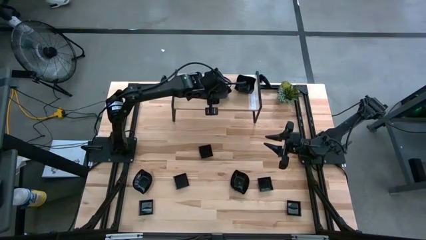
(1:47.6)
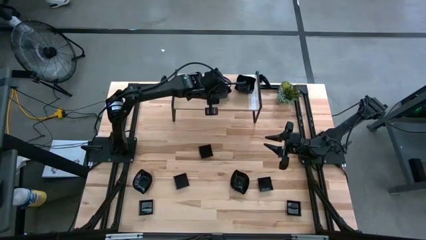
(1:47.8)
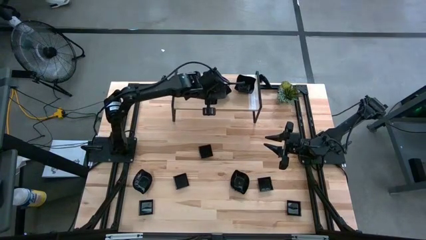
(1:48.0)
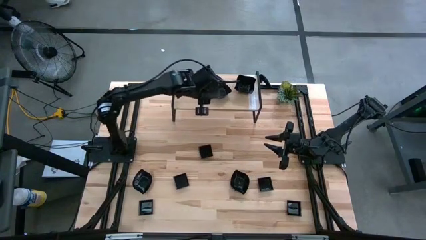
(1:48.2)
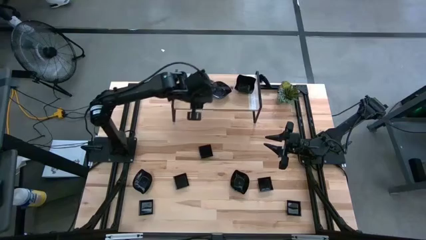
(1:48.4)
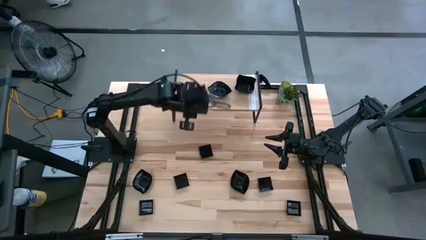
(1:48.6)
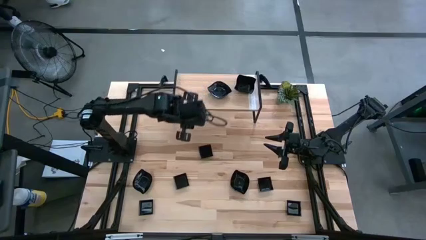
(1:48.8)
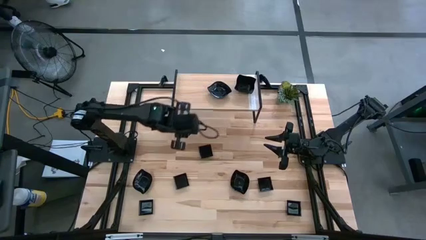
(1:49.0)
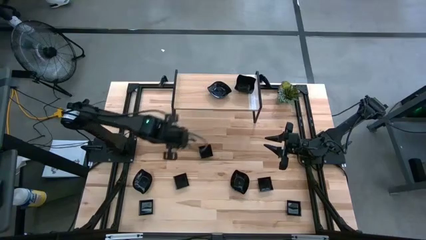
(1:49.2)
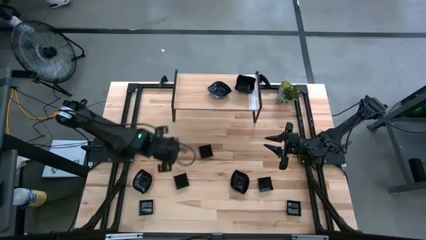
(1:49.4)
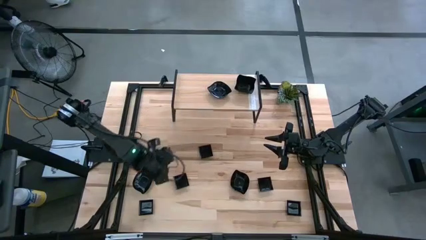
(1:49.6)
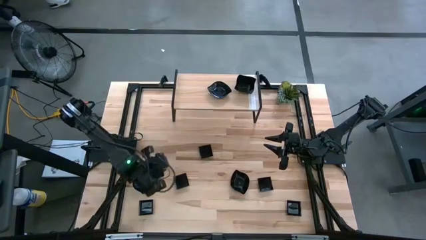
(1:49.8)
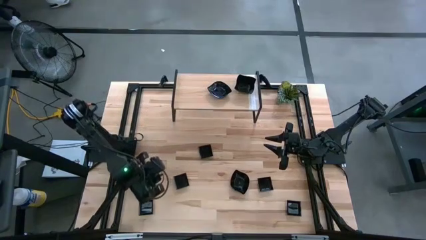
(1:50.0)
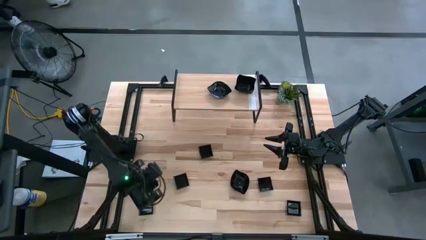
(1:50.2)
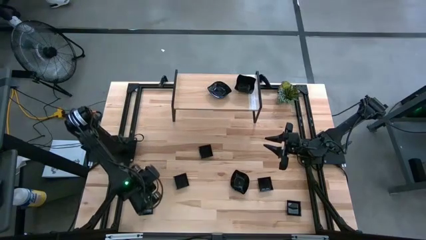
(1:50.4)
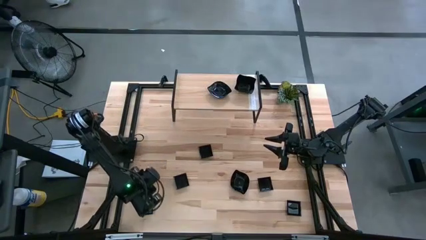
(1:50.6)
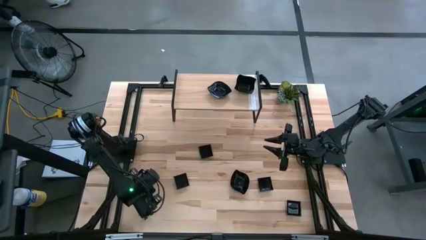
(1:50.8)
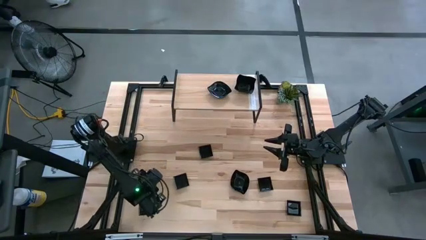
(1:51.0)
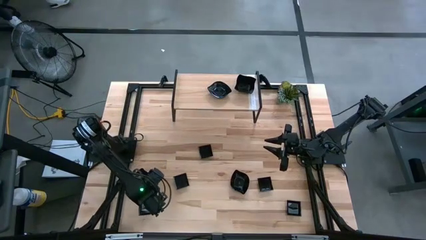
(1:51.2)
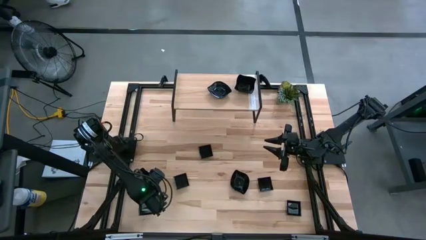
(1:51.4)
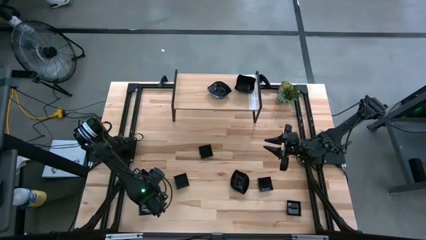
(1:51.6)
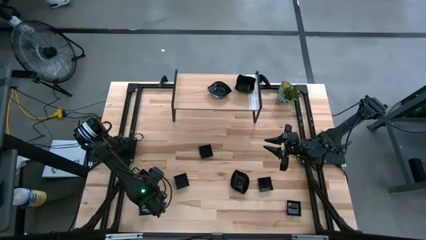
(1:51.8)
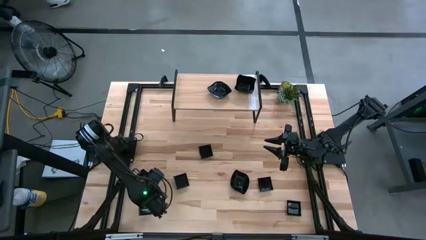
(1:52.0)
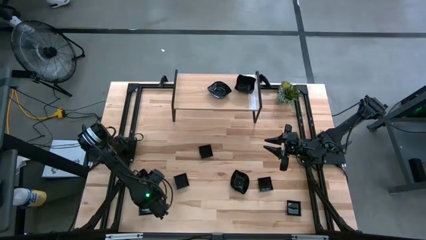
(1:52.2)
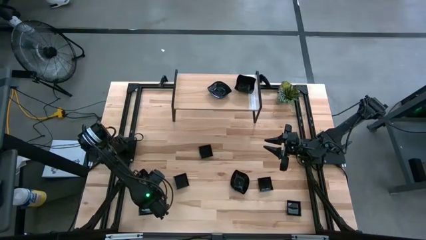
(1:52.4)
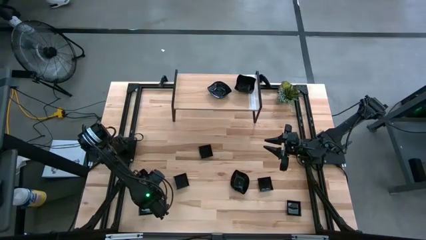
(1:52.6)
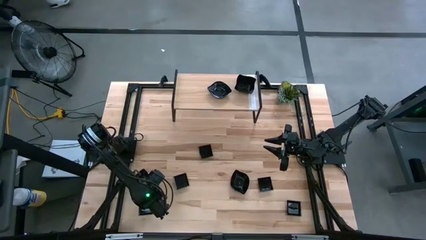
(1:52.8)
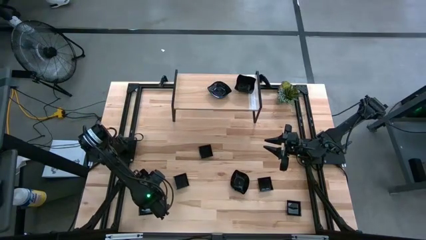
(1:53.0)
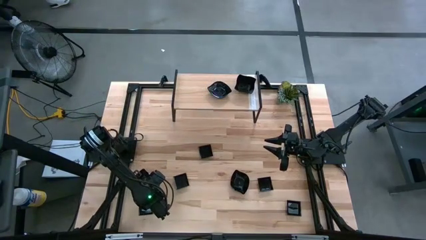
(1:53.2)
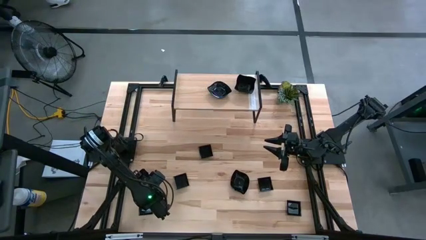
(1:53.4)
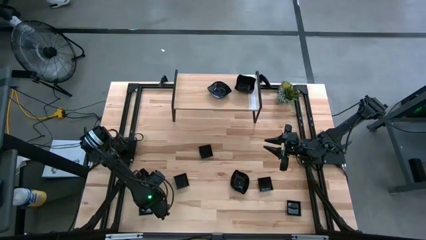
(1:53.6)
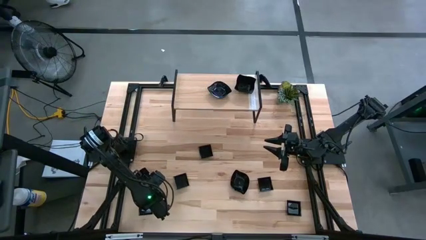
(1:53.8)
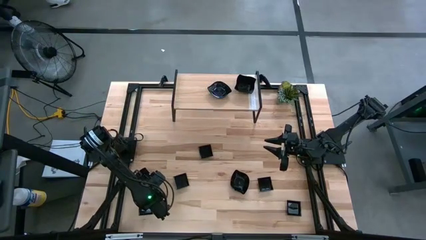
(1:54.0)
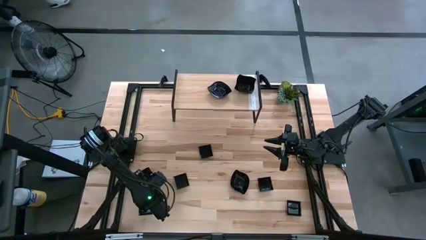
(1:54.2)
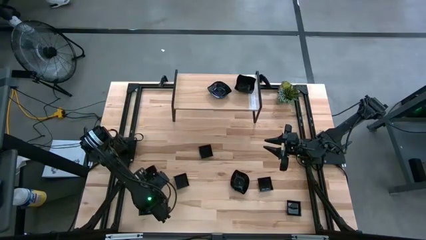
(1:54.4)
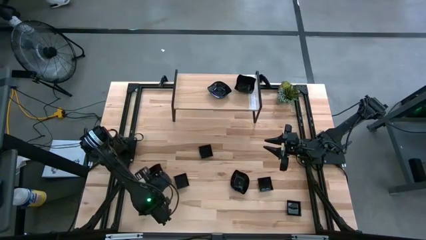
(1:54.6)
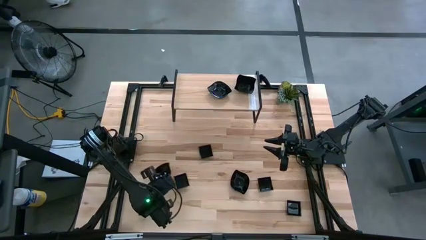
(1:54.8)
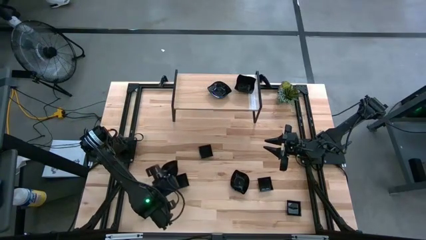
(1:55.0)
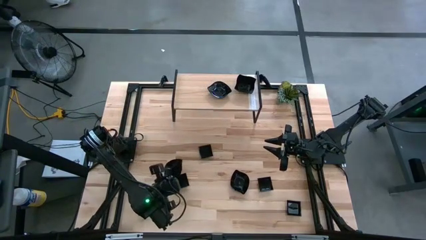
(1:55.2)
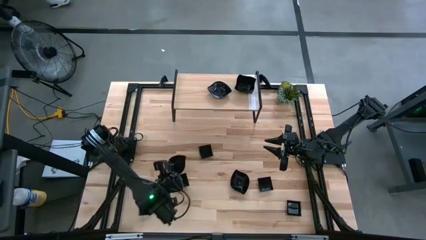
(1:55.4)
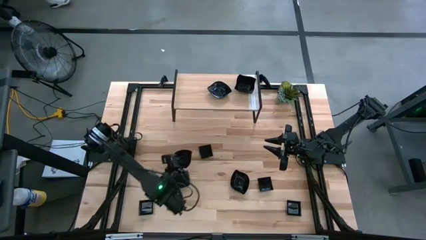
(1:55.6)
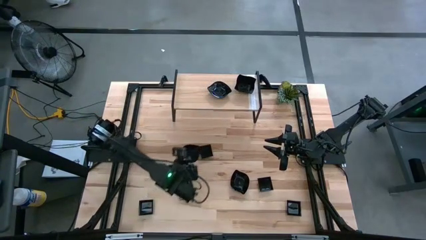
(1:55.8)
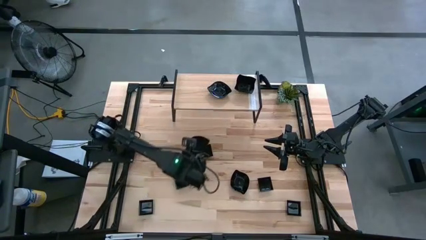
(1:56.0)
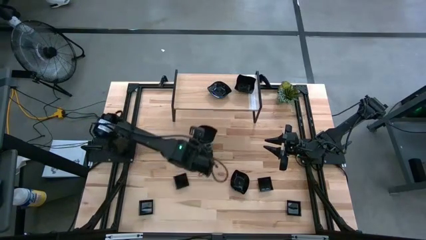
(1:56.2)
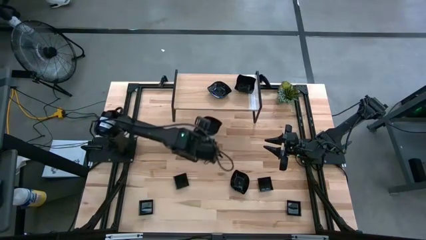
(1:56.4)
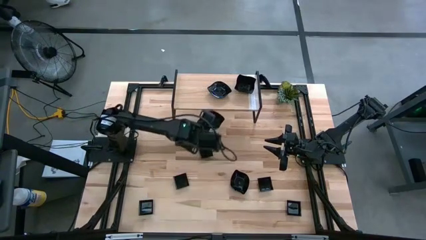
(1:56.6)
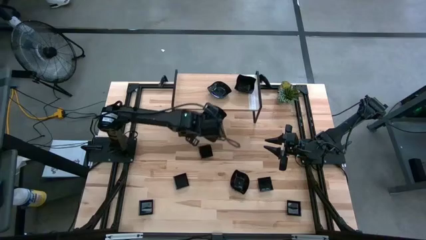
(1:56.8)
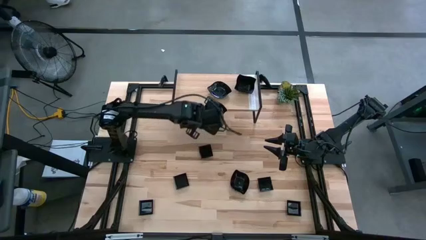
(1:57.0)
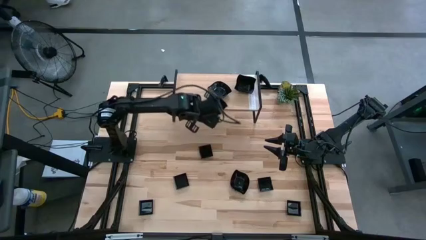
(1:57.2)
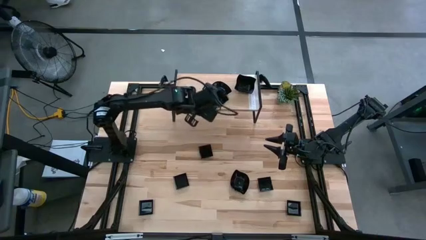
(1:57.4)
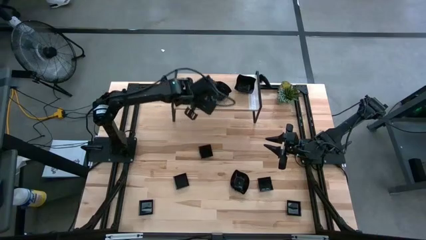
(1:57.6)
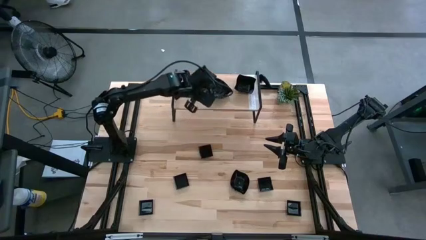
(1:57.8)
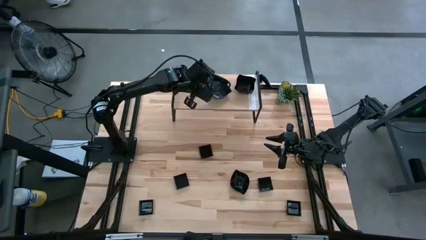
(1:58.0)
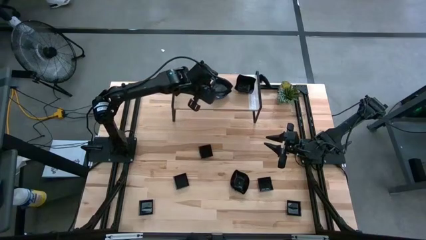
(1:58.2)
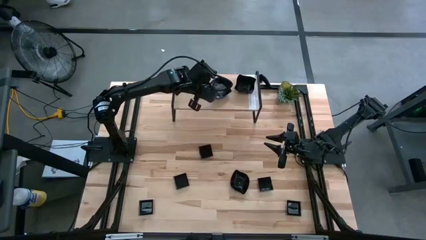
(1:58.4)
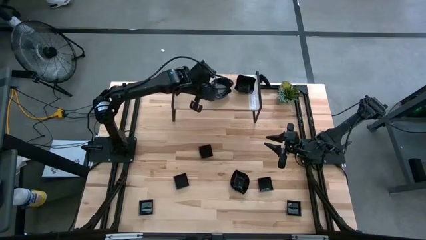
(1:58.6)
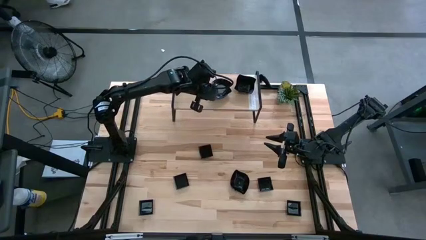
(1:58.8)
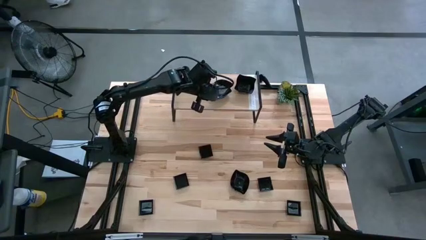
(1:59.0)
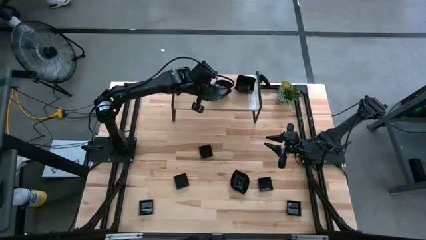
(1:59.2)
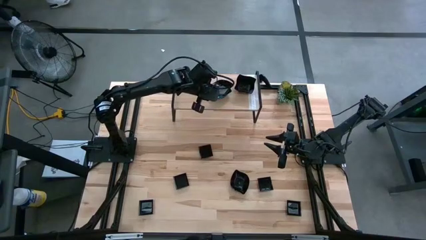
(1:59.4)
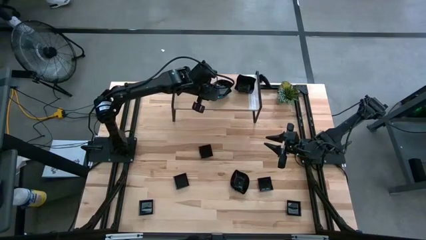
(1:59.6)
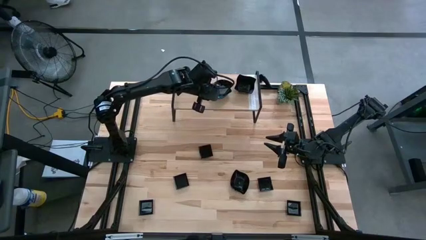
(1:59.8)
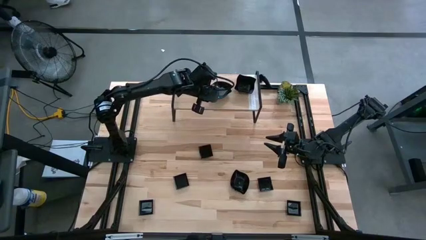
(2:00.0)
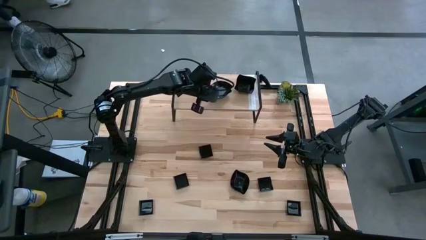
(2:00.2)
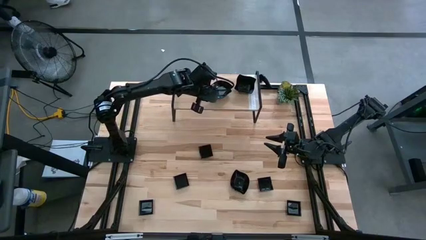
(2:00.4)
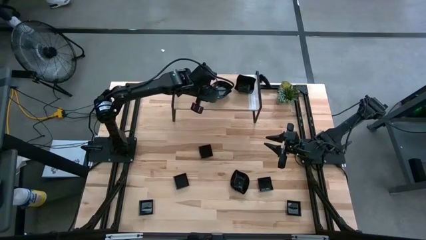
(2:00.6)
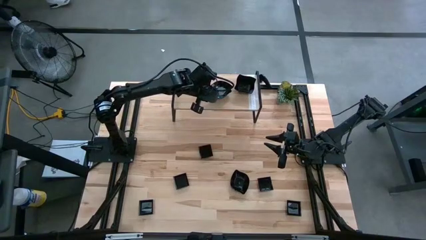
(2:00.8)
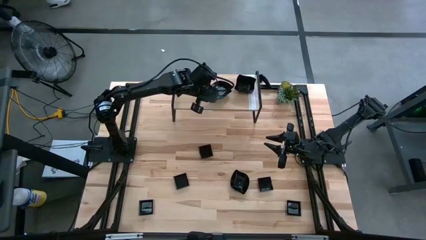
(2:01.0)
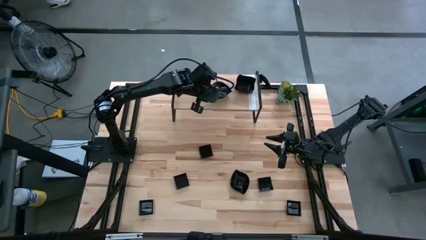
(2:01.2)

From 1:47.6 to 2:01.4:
Task: Pick & Place Mini shaped plates
Stack the leaf-shaped plate on top of the other leaf-shaped plates on the shelf
